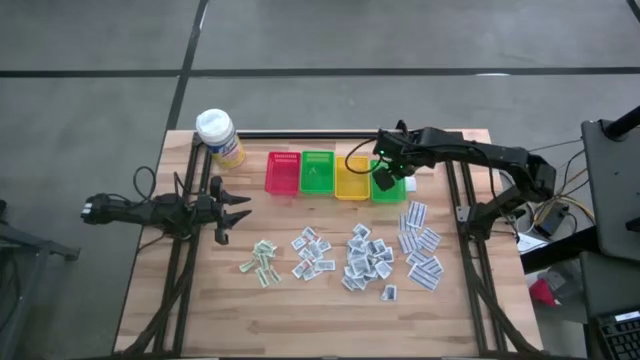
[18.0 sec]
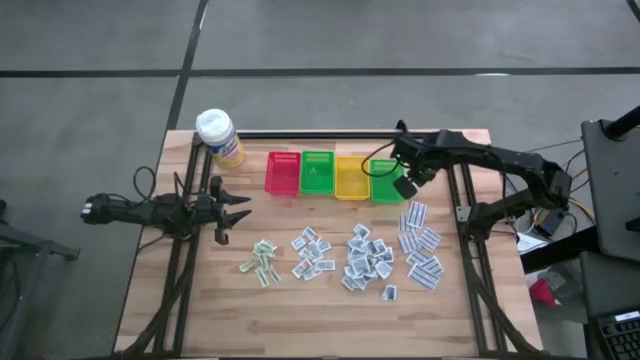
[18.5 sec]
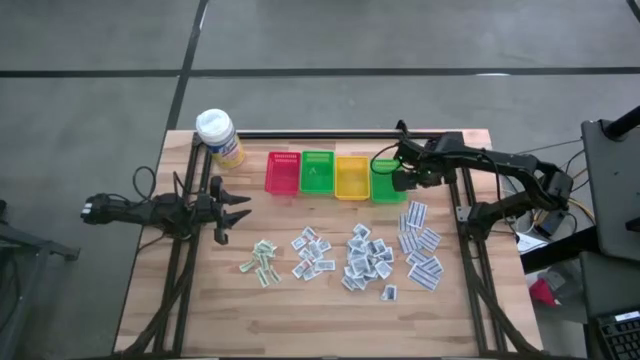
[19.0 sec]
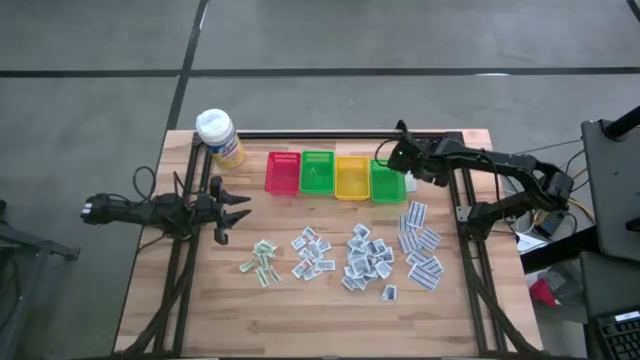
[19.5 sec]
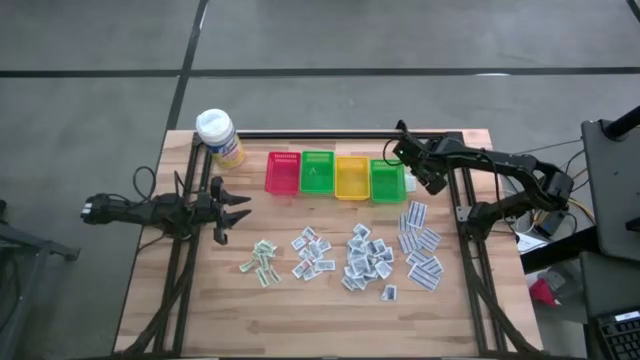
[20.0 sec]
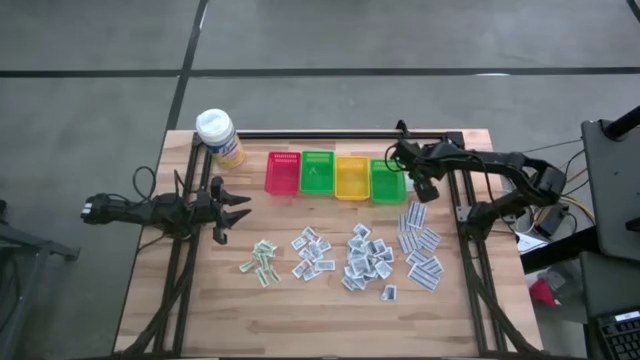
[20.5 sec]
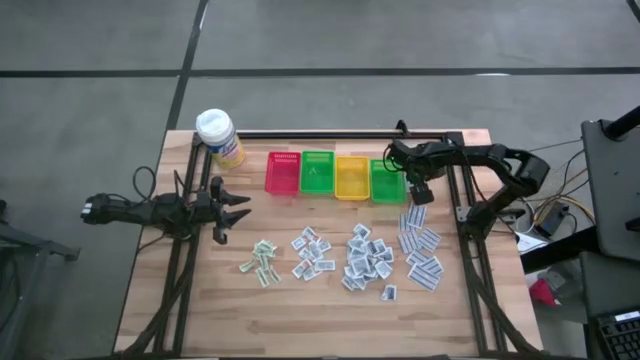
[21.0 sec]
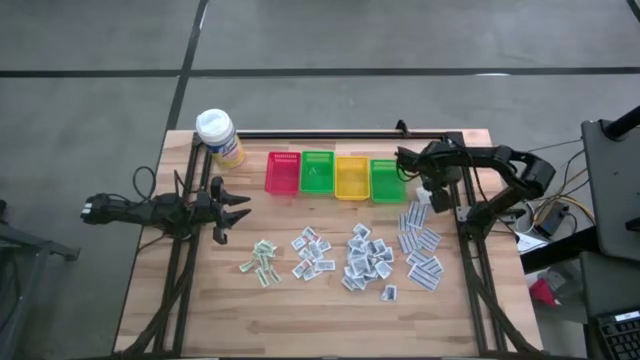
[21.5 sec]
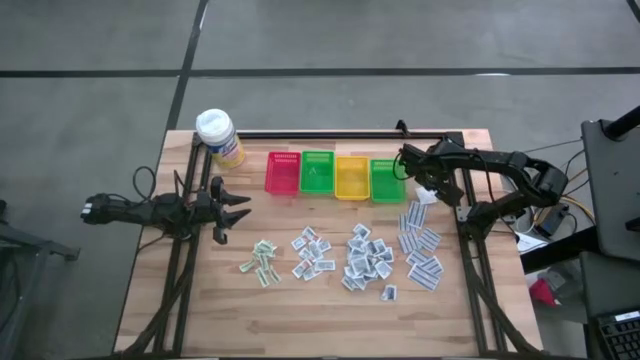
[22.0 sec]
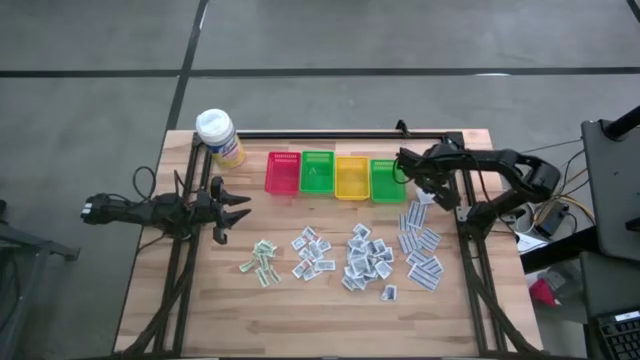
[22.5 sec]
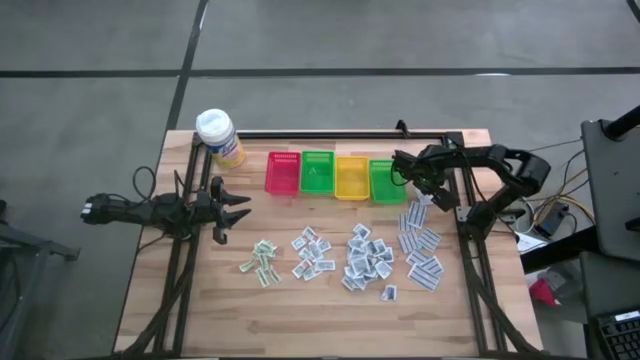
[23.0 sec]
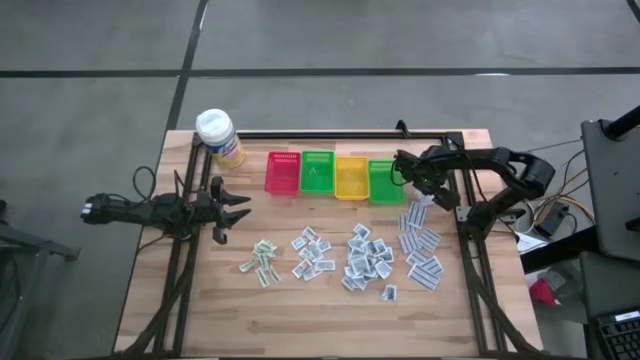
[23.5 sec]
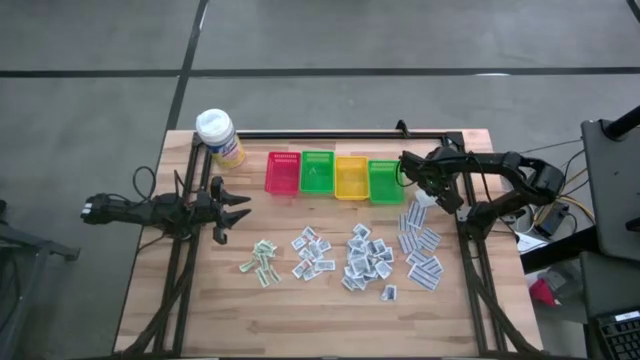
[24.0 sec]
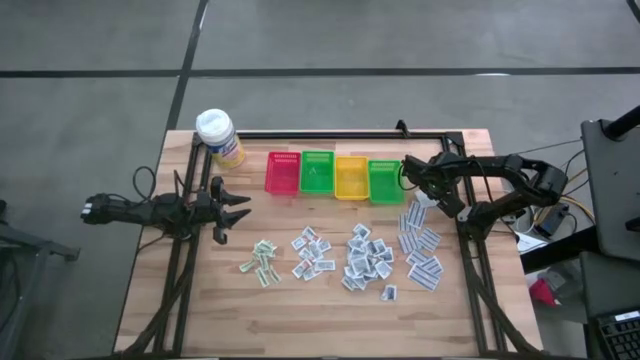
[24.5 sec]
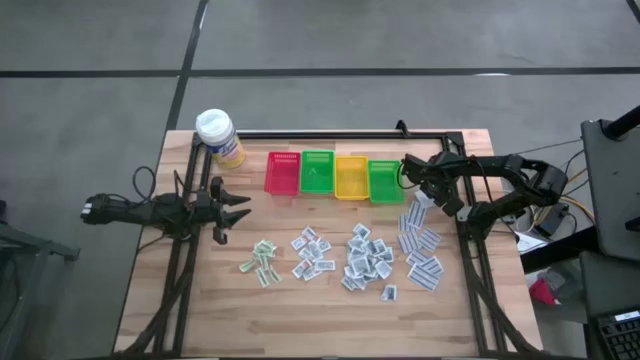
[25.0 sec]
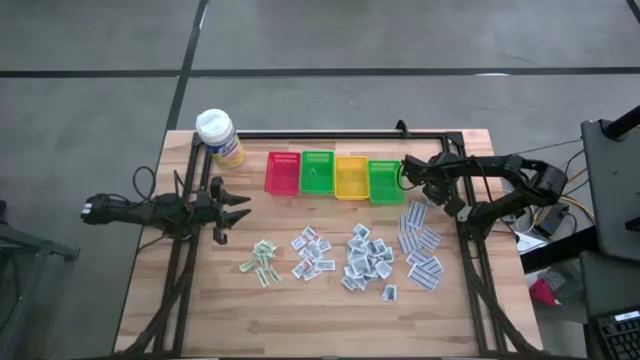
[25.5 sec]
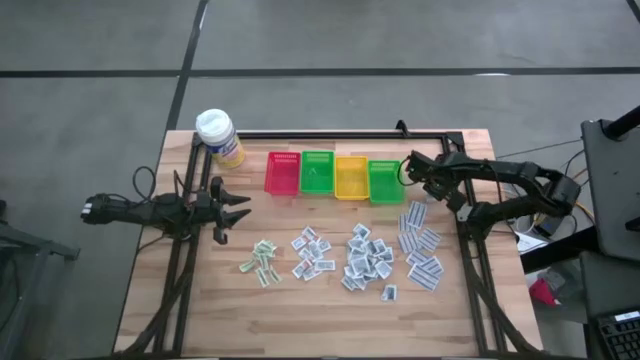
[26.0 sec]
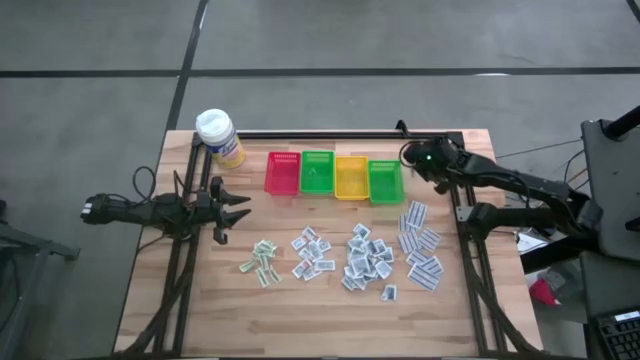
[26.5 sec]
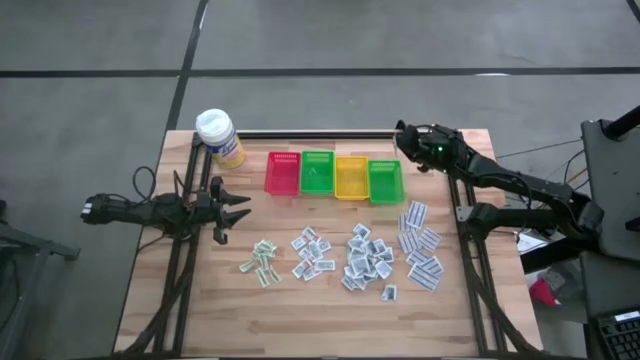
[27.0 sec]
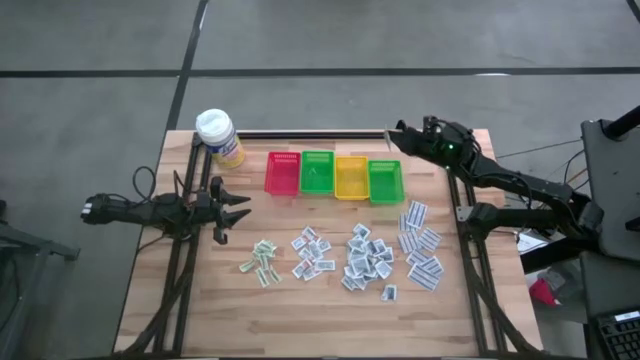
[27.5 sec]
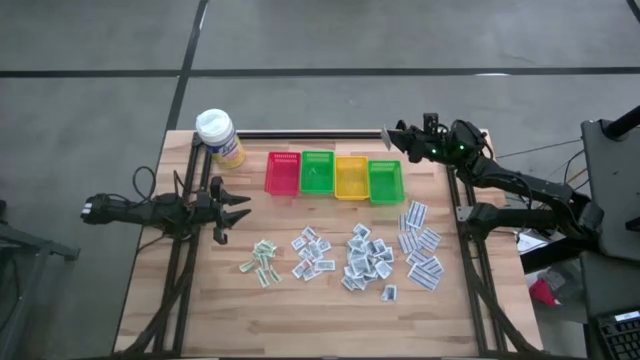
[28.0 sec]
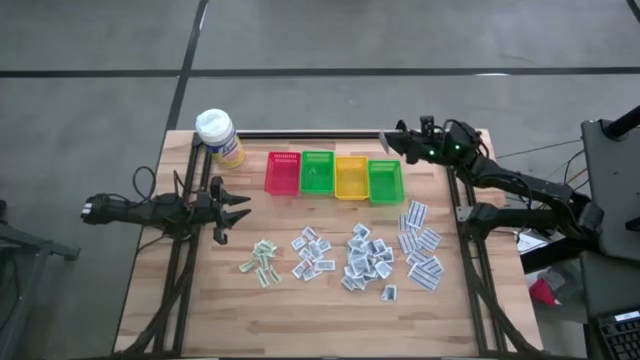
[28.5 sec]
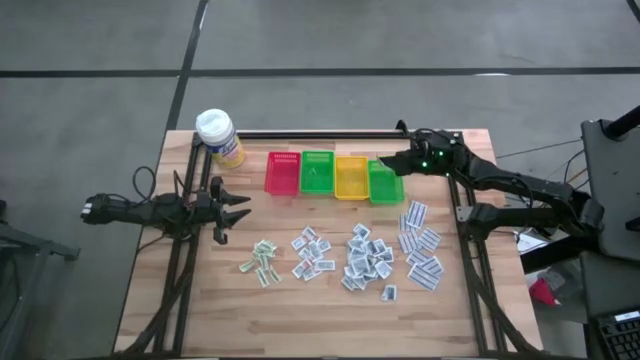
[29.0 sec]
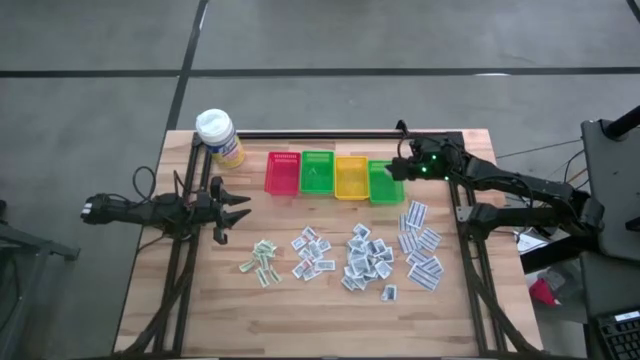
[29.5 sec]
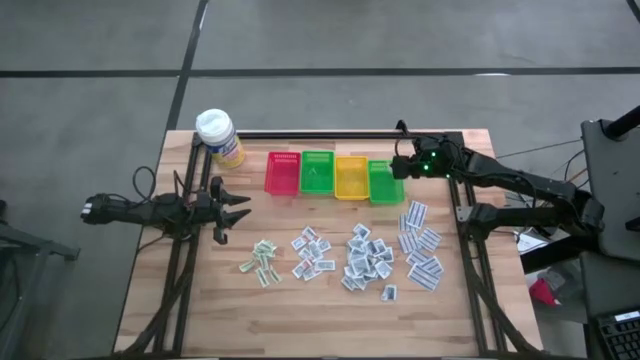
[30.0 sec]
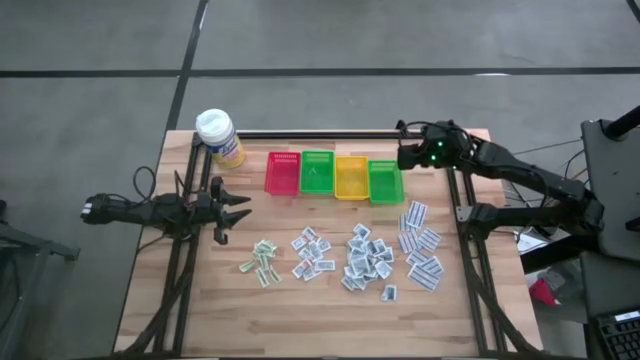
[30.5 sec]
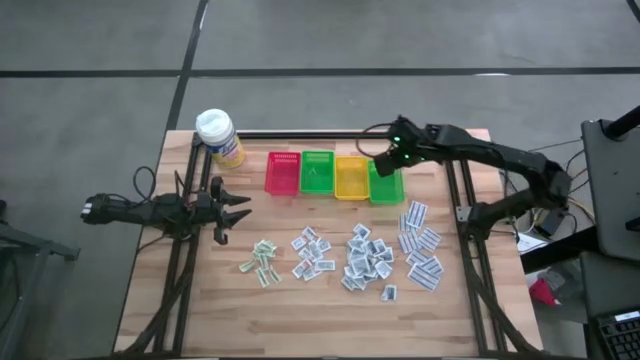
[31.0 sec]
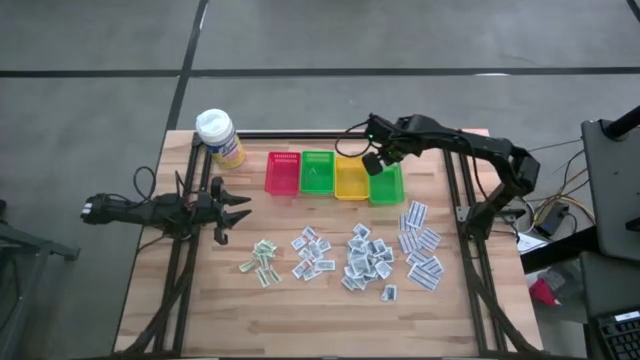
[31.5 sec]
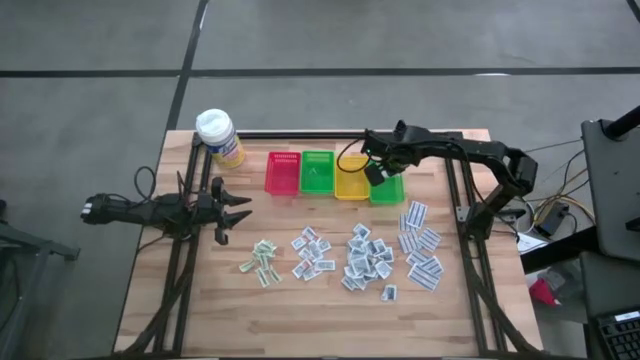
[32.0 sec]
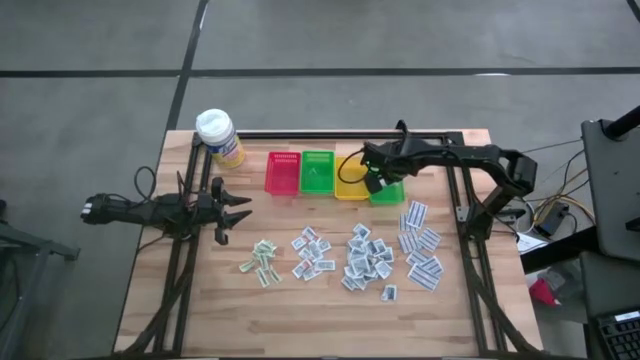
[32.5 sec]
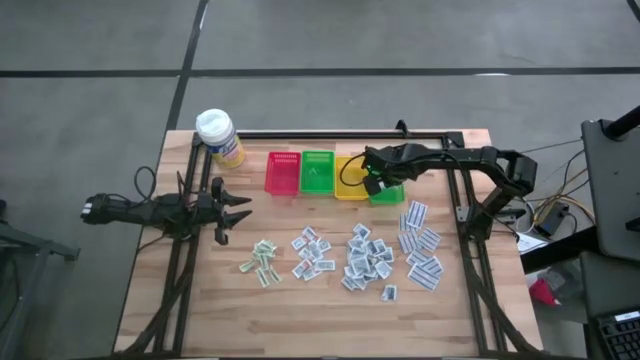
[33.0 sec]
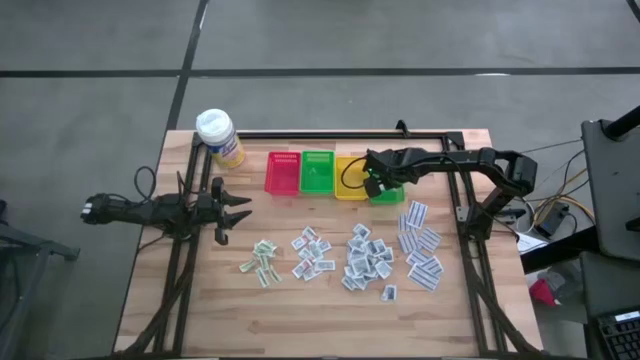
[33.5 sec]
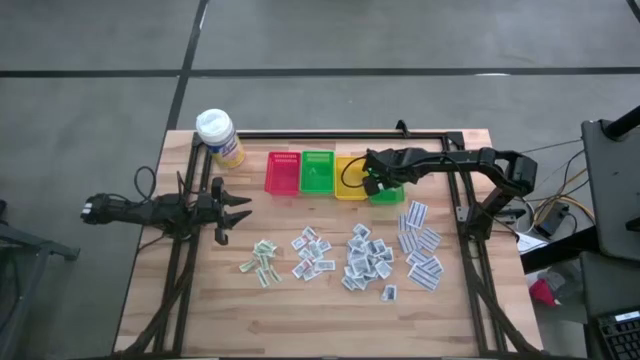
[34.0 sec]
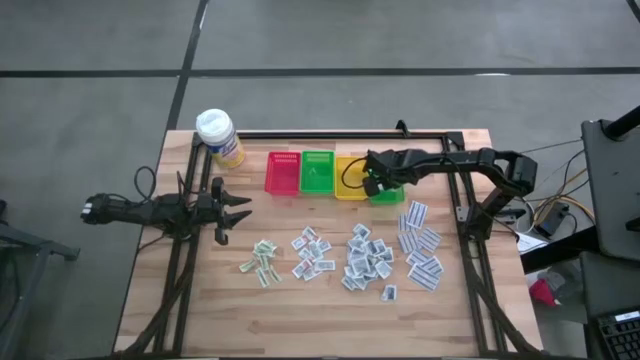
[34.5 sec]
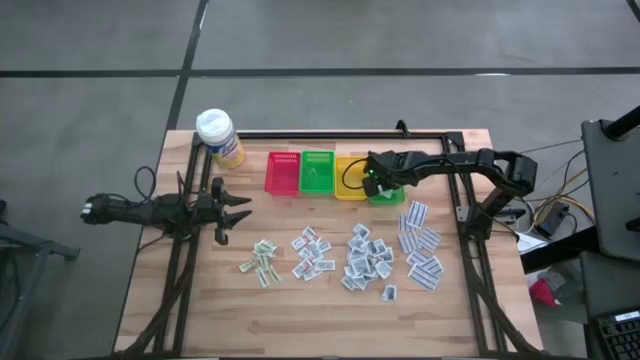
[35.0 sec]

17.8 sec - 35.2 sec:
Task: Pick & Place First Aid Supplies
Put the blue bandage into the right green bin
